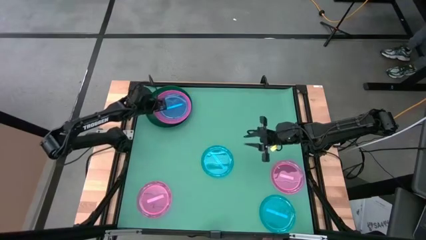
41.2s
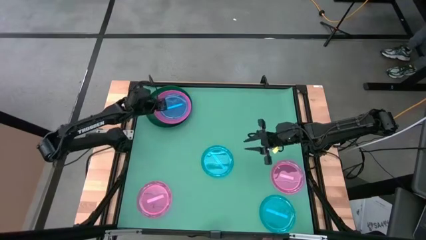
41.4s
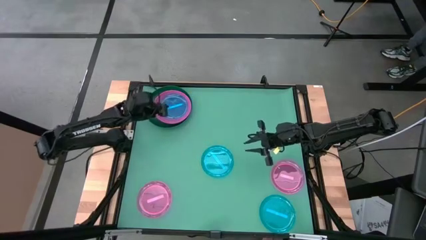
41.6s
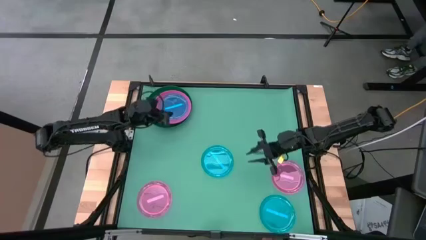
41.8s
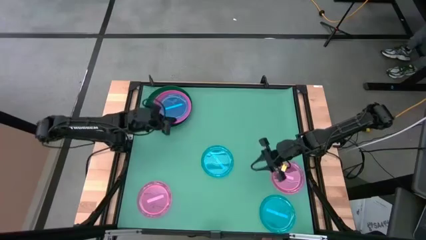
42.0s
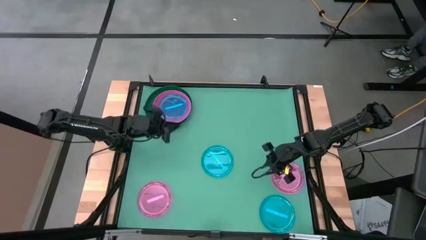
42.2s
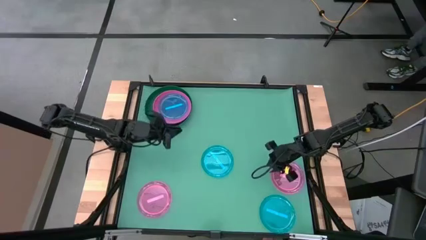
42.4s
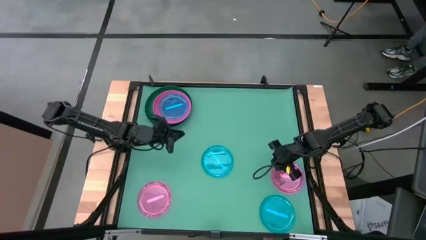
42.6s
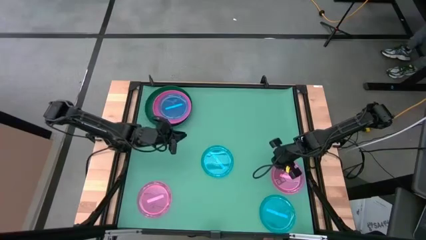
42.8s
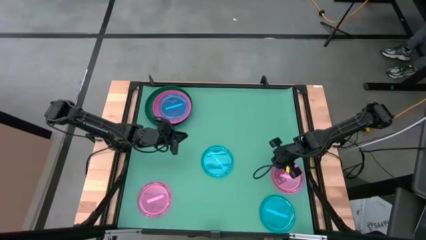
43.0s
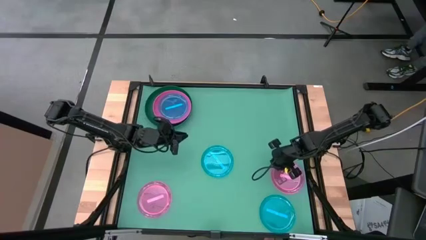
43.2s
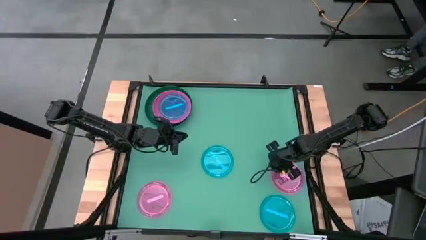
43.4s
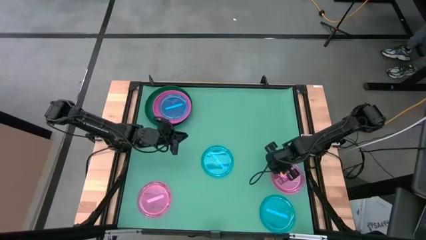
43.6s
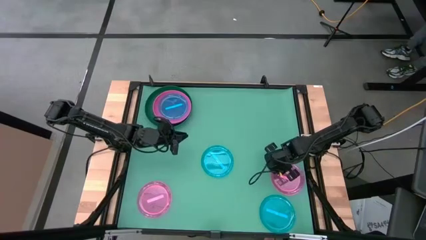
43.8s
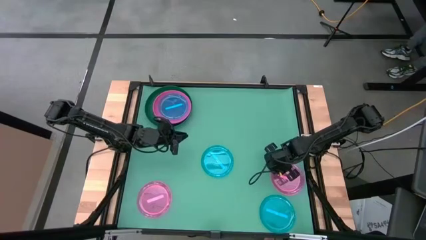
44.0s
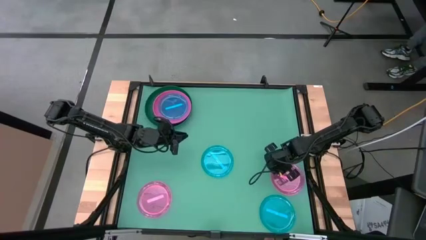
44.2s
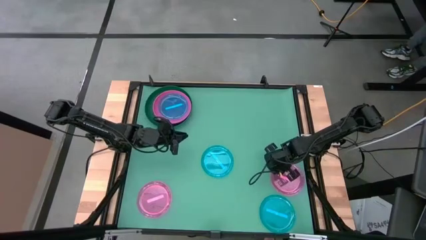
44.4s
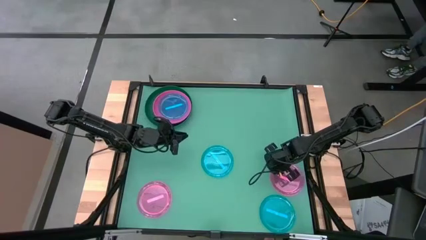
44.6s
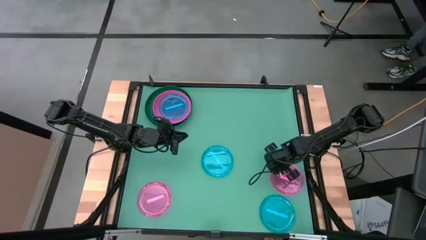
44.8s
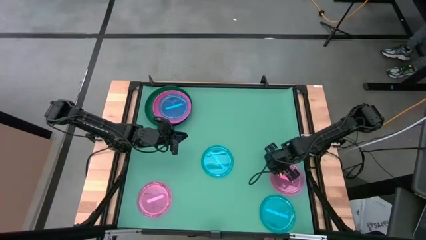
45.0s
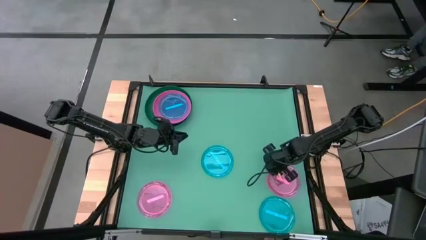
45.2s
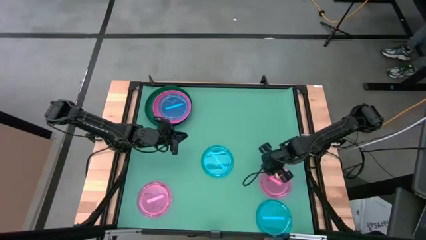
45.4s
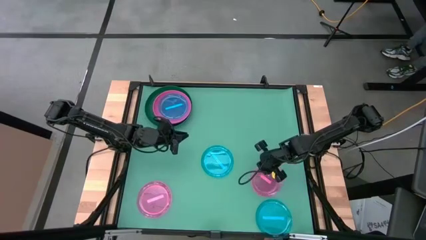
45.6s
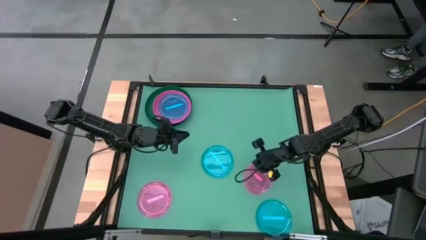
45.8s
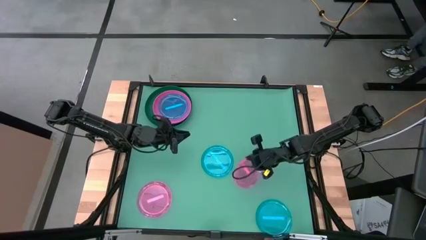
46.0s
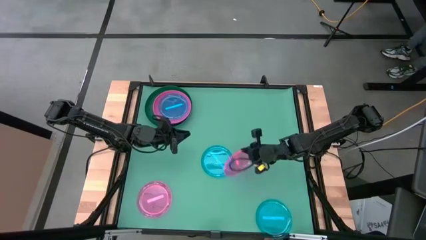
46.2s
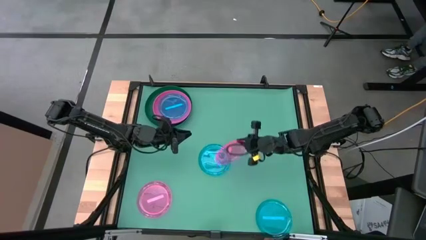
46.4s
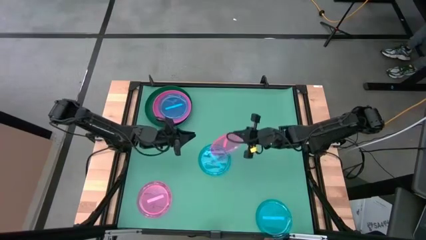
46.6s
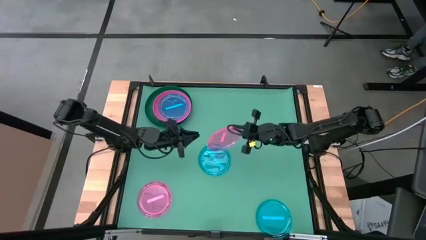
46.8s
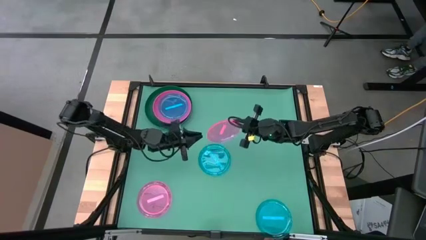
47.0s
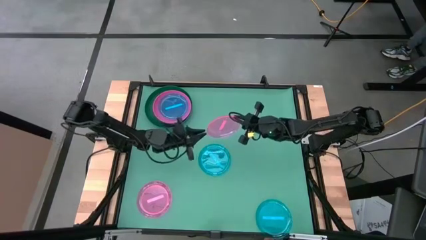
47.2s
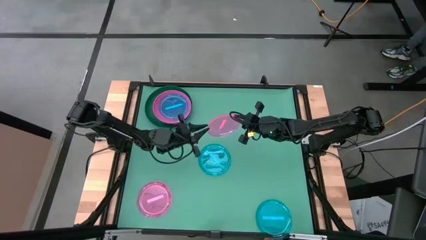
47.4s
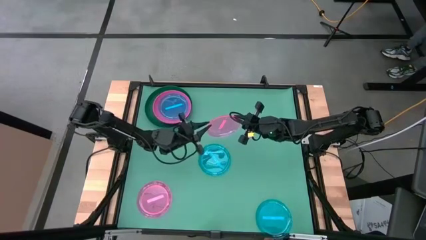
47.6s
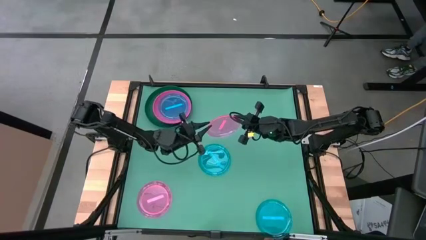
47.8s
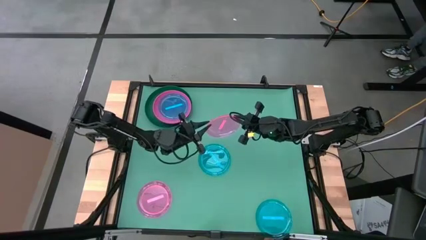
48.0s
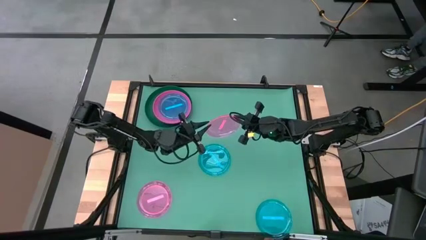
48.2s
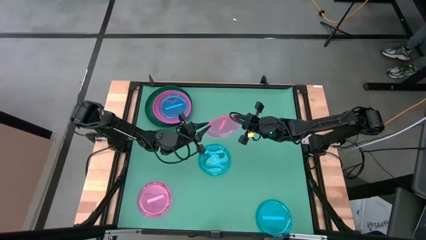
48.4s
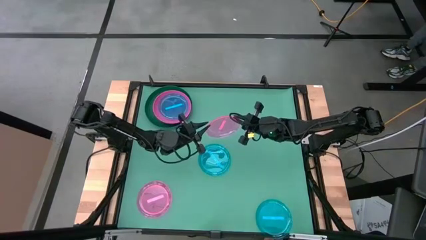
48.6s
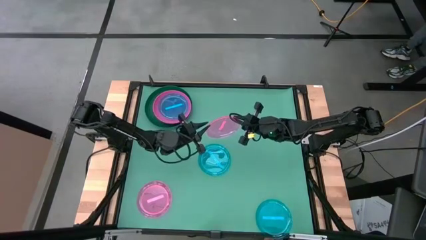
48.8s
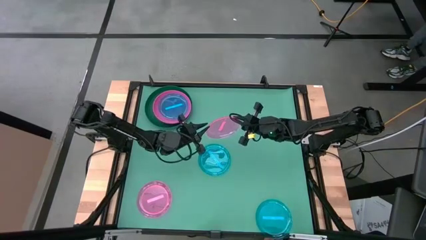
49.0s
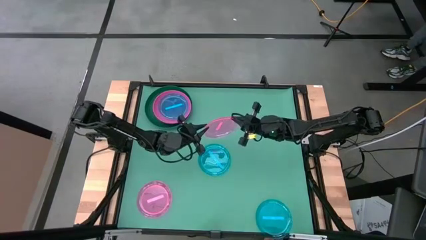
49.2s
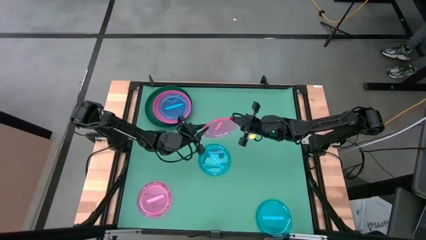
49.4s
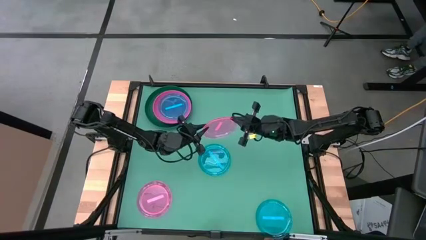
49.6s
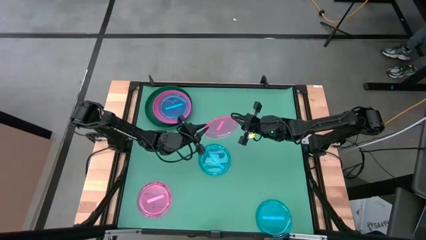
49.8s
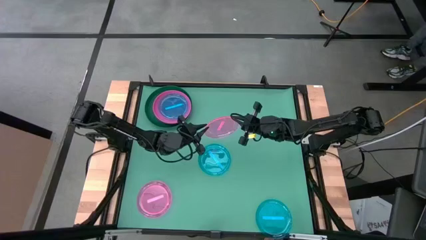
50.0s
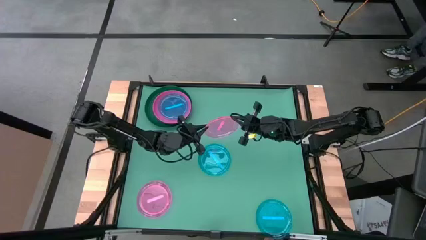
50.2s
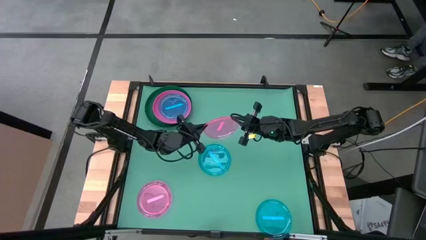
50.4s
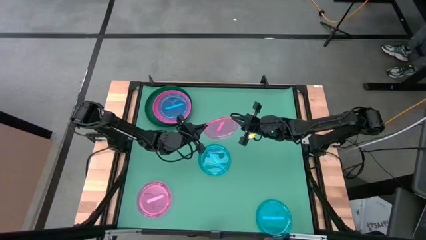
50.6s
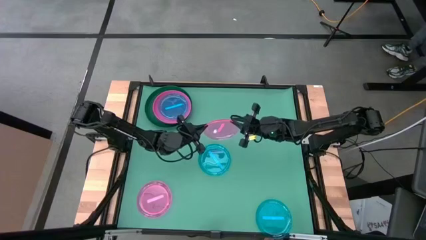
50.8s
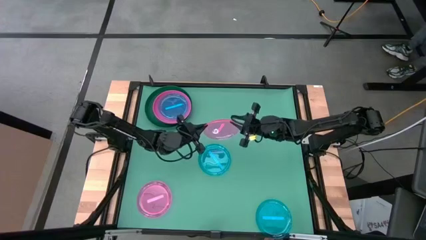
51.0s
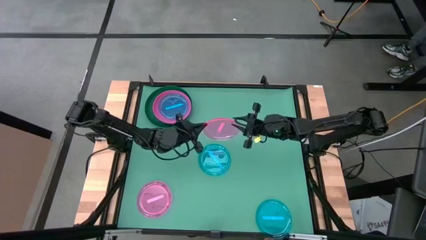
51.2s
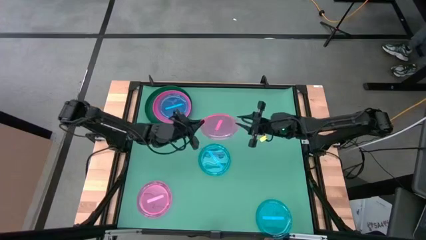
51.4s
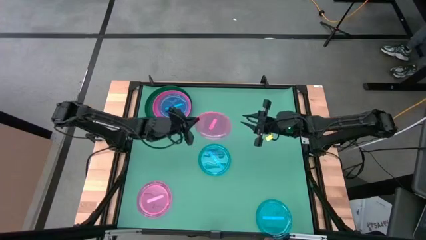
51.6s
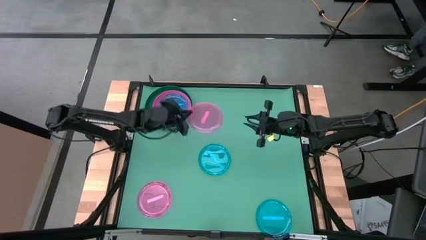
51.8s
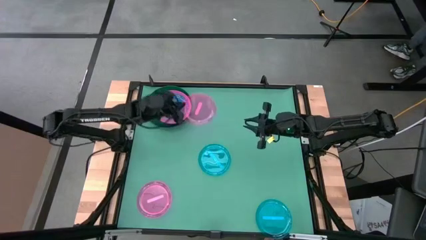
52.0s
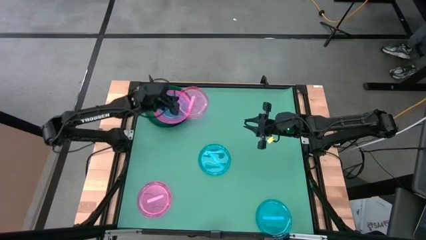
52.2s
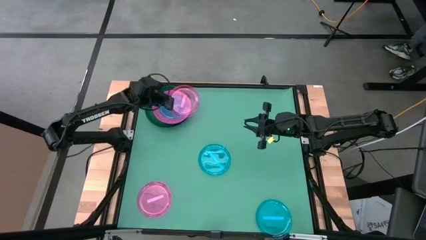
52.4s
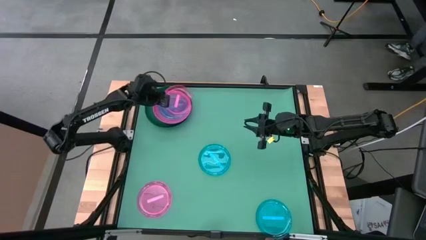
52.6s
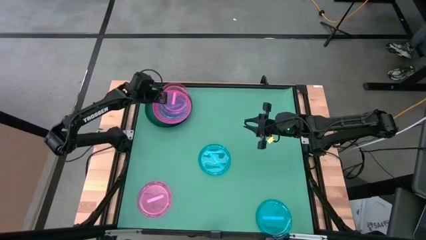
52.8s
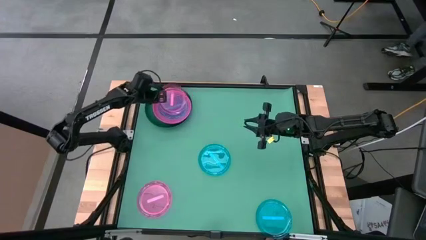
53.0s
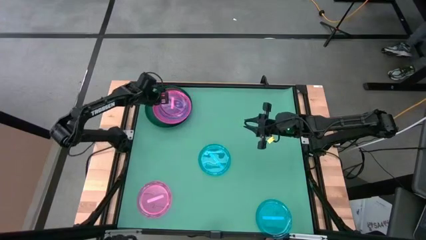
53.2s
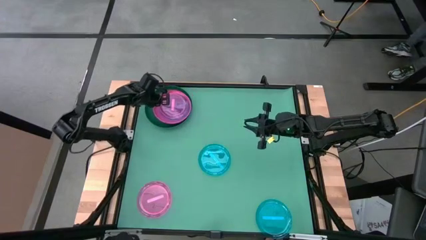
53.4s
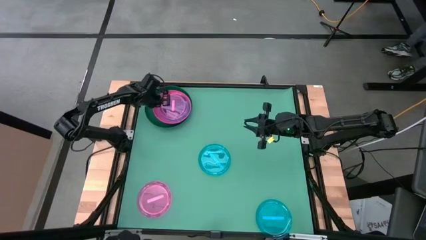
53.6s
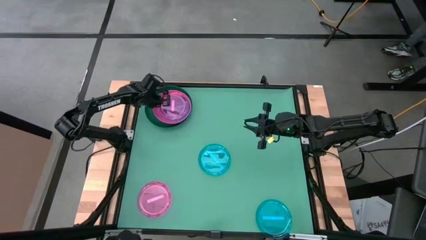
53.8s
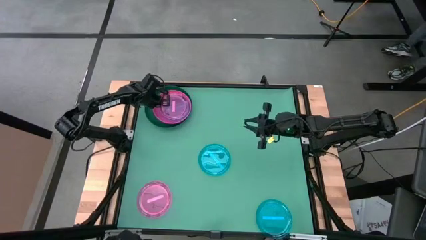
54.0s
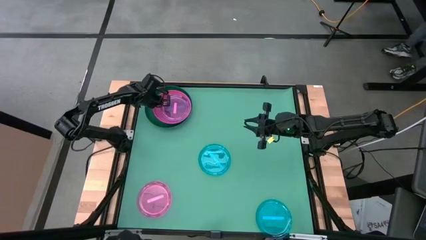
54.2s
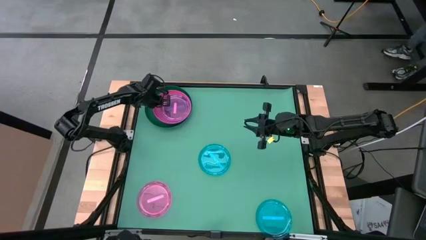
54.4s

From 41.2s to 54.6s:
Task: Stack plastic plates
Stack the right light pink plate on top of the blue plate

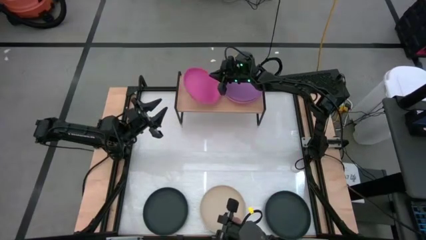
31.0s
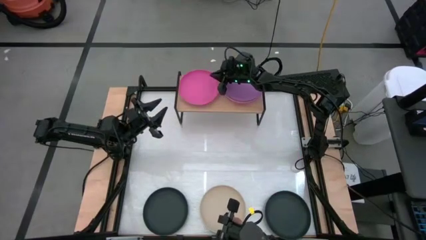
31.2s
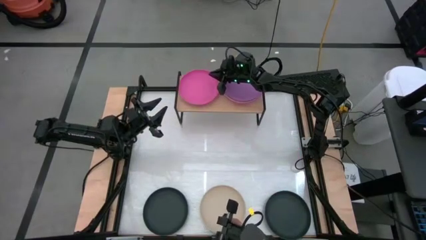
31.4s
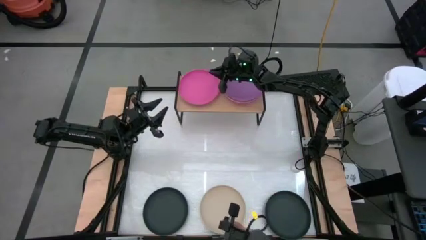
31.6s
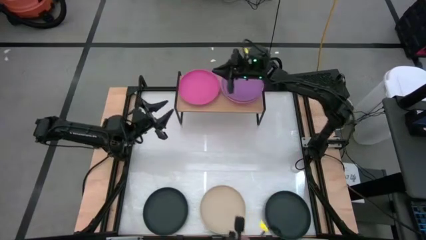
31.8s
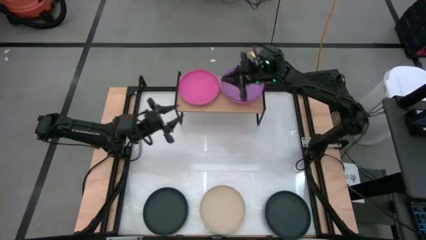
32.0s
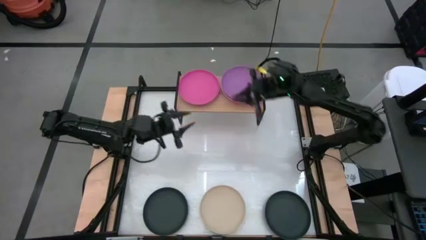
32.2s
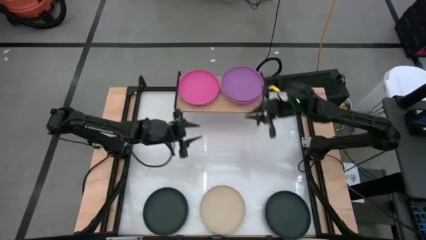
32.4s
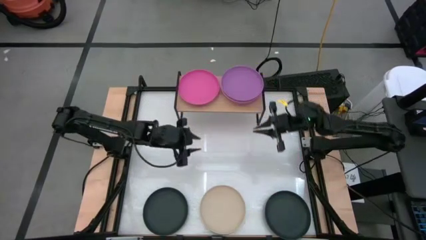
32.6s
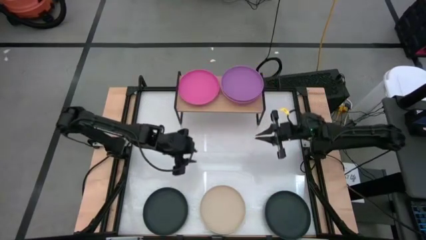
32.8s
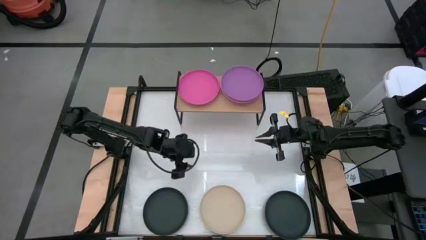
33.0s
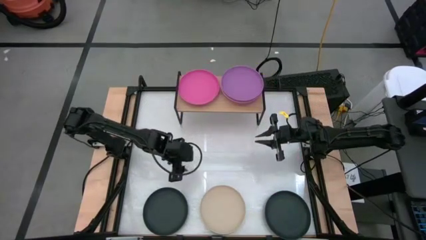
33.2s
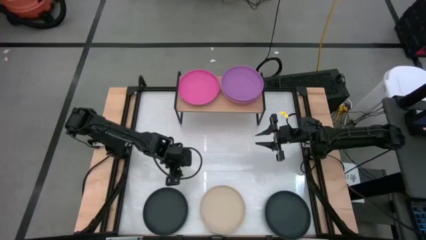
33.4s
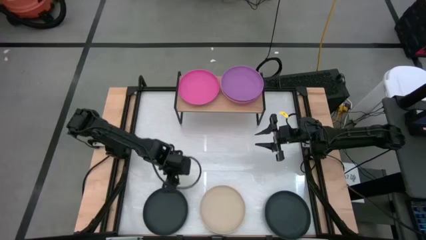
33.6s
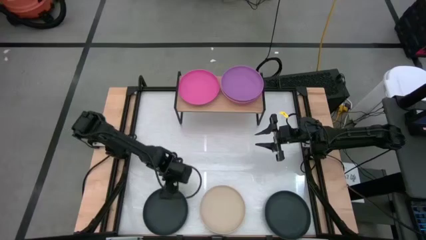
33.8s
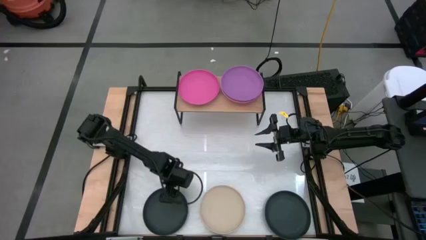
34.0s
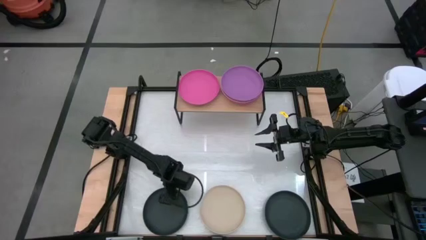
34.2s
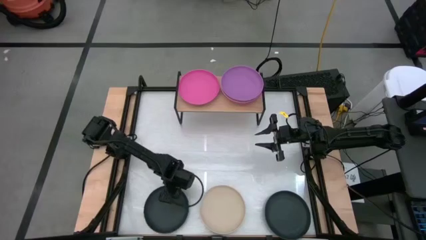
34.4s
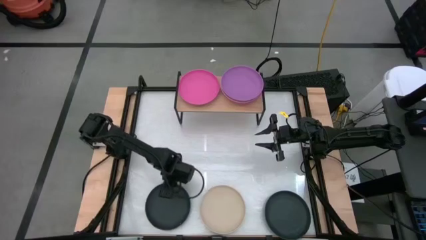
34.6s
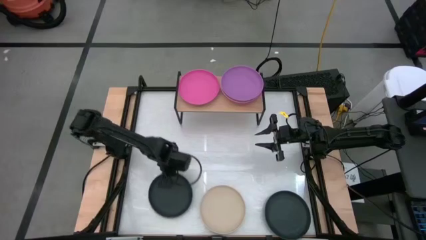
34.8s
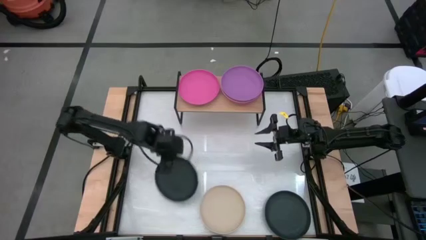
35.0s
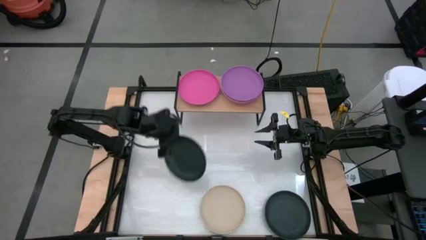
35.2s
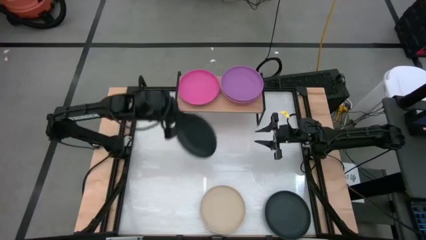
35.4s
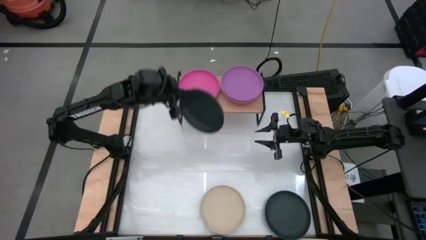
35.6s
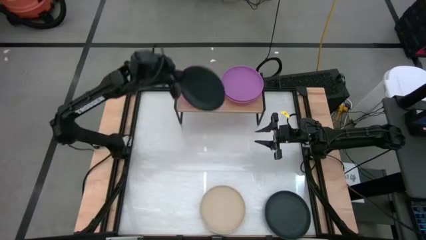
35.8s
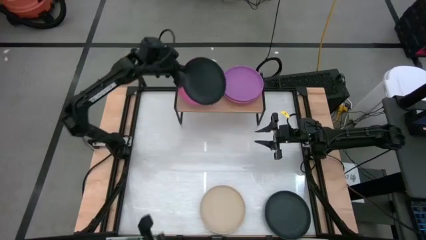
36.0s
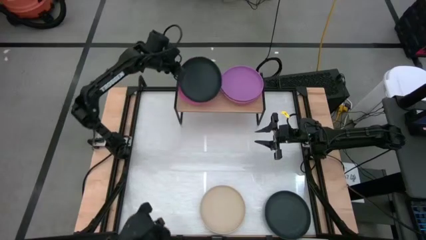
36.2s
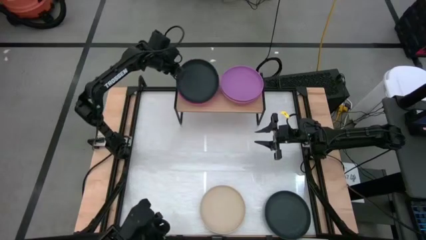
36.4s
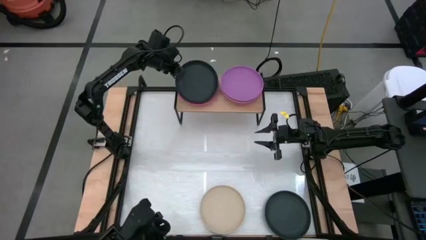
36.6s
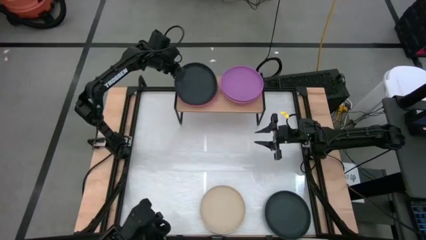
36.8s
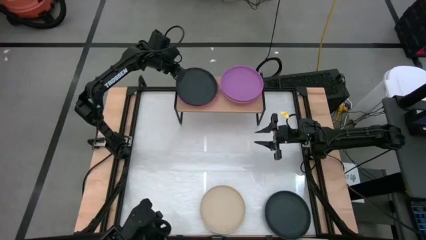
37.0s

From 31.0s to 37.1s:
Task: Place and stack plates onto a shelf
Stack the left black plate on top of the pink plate on the shelf
